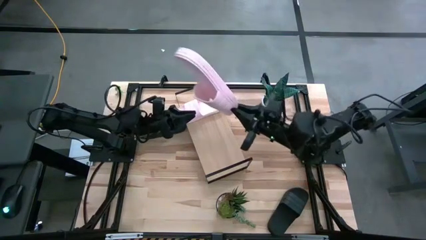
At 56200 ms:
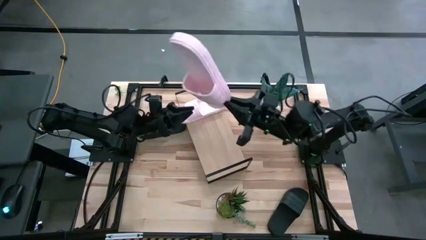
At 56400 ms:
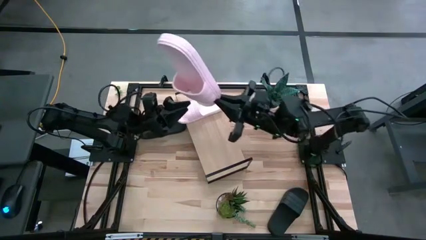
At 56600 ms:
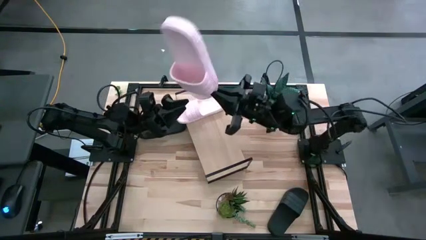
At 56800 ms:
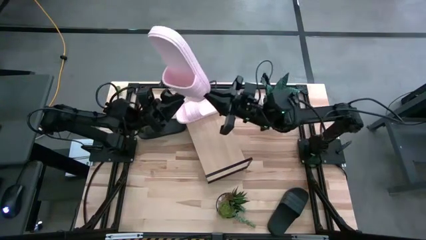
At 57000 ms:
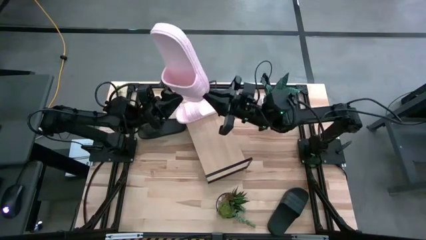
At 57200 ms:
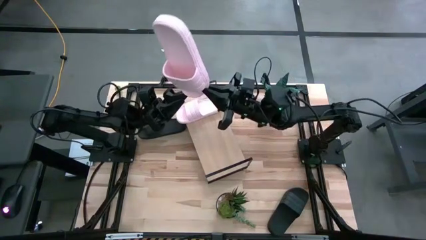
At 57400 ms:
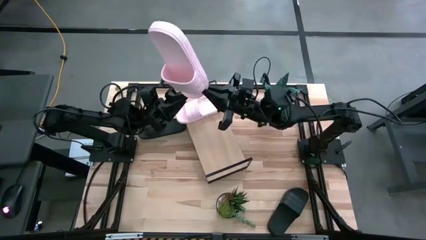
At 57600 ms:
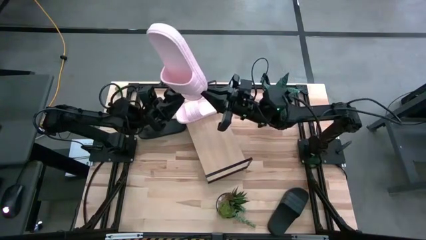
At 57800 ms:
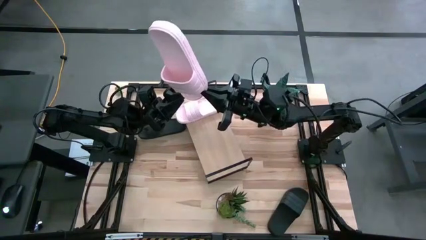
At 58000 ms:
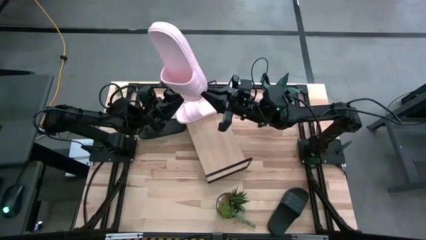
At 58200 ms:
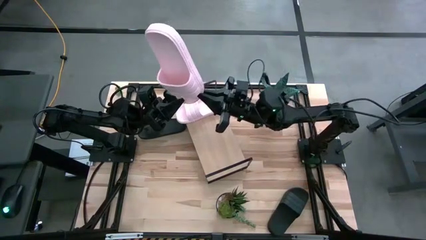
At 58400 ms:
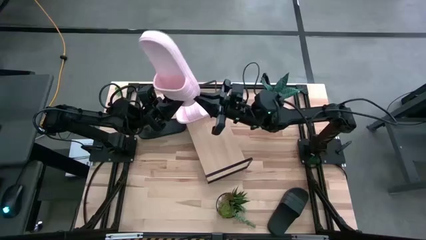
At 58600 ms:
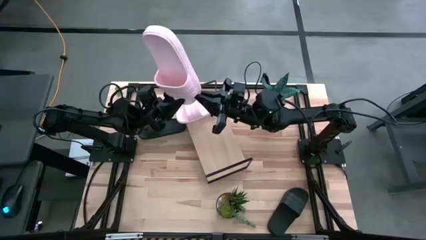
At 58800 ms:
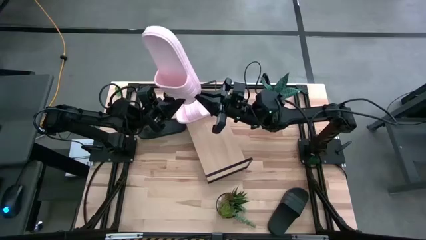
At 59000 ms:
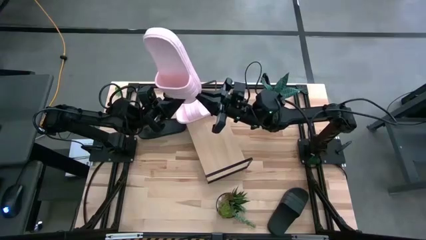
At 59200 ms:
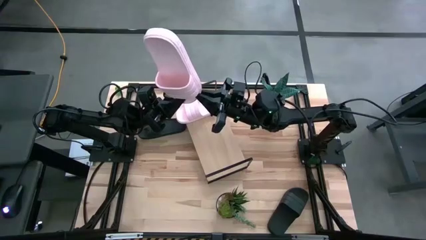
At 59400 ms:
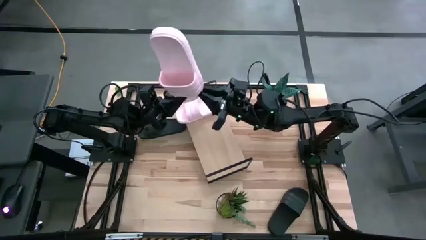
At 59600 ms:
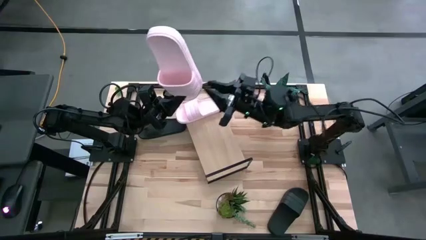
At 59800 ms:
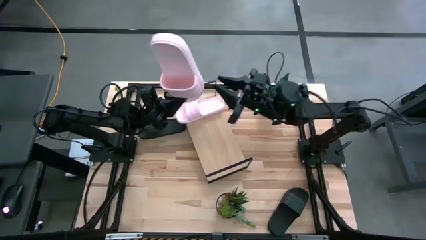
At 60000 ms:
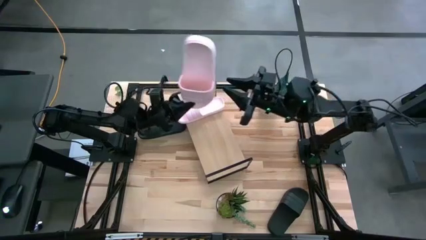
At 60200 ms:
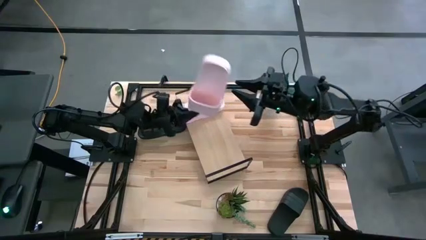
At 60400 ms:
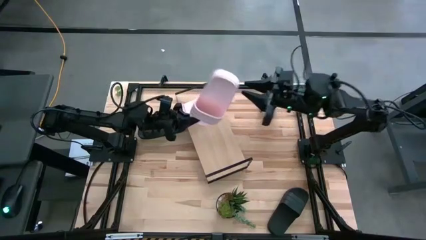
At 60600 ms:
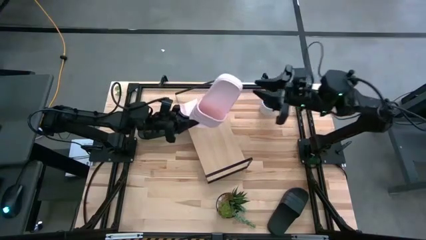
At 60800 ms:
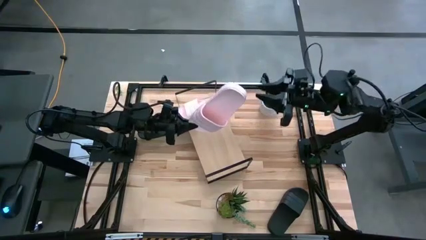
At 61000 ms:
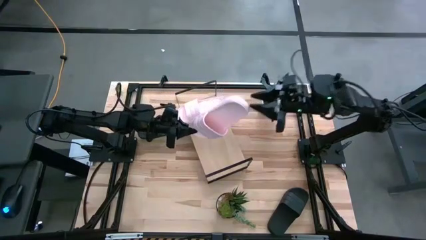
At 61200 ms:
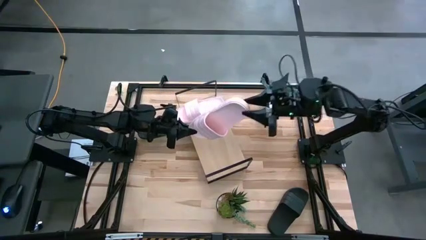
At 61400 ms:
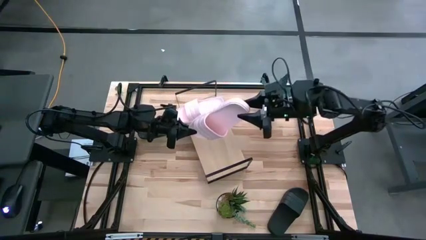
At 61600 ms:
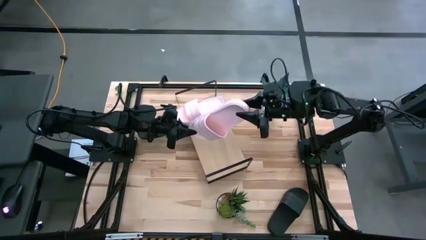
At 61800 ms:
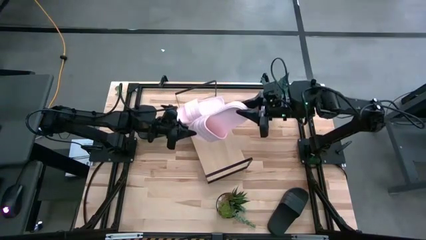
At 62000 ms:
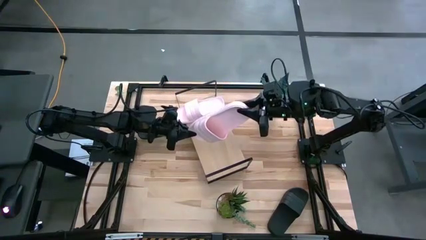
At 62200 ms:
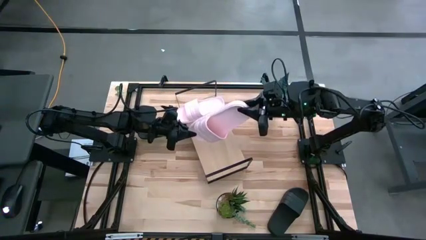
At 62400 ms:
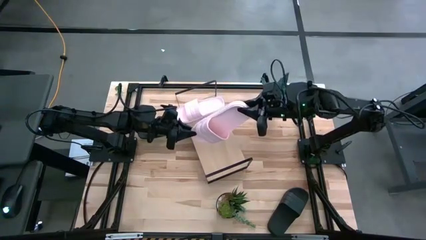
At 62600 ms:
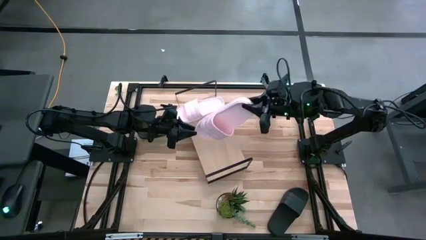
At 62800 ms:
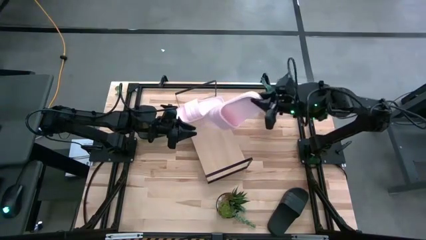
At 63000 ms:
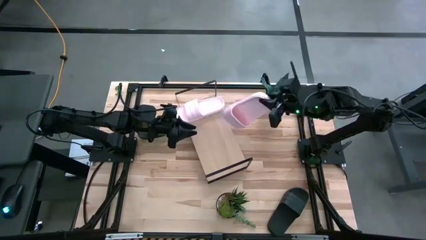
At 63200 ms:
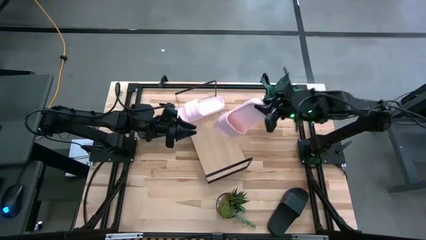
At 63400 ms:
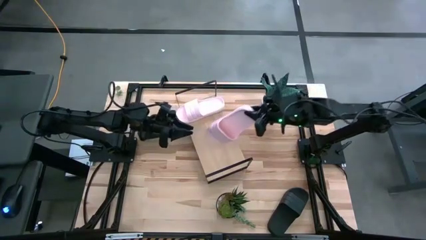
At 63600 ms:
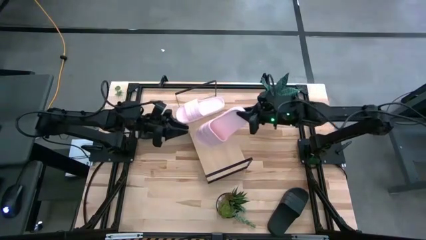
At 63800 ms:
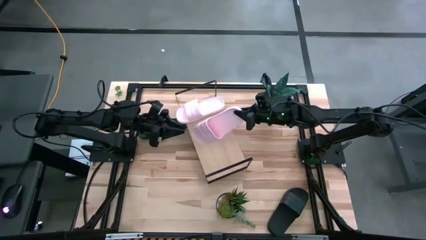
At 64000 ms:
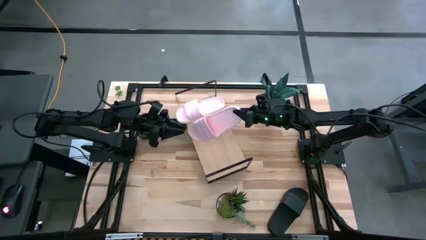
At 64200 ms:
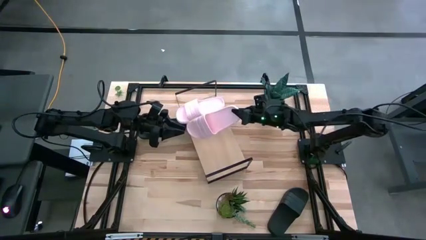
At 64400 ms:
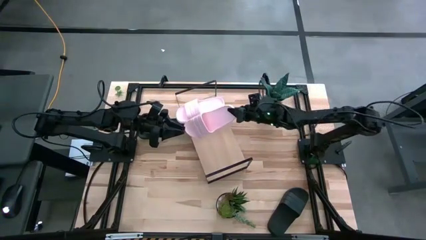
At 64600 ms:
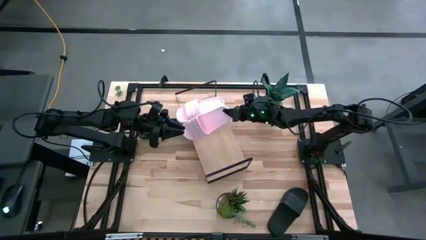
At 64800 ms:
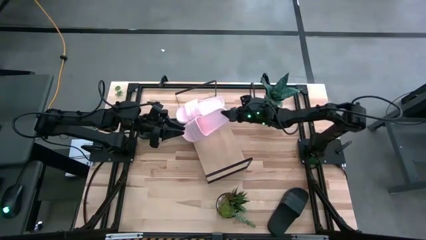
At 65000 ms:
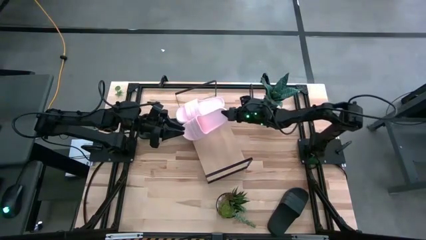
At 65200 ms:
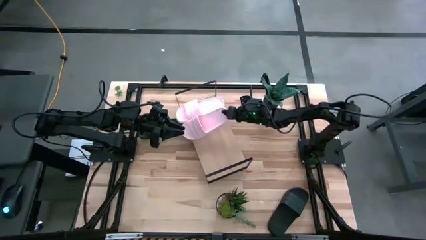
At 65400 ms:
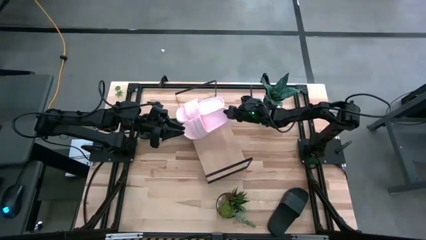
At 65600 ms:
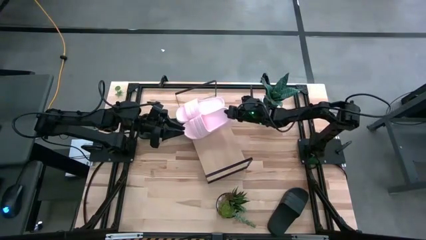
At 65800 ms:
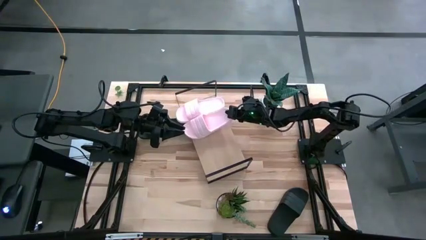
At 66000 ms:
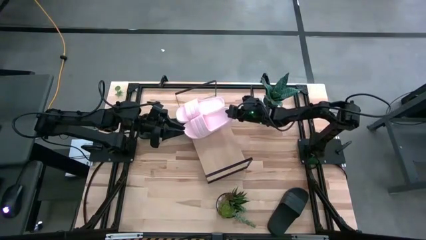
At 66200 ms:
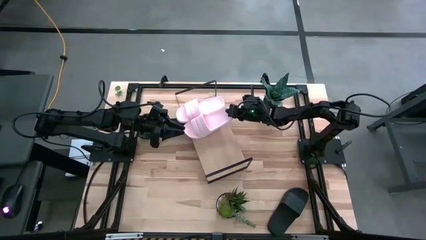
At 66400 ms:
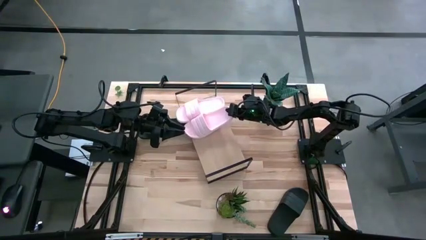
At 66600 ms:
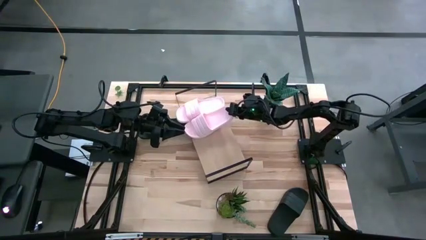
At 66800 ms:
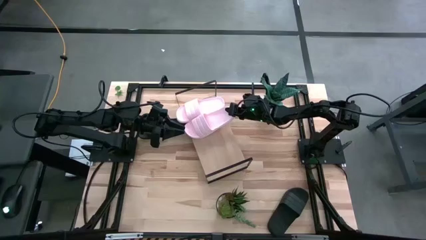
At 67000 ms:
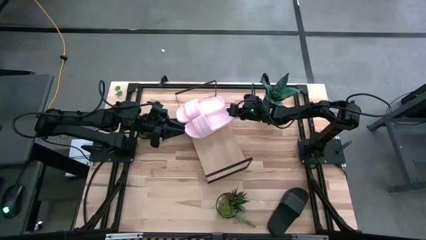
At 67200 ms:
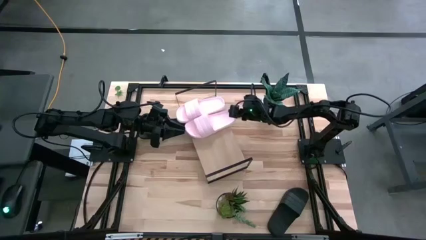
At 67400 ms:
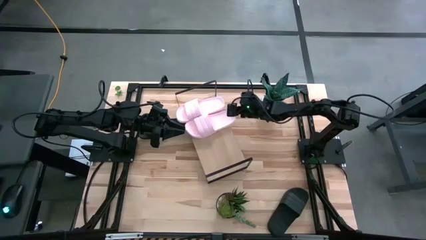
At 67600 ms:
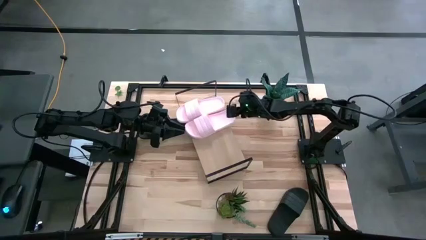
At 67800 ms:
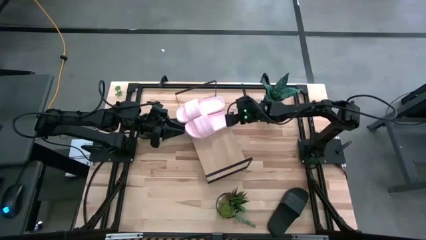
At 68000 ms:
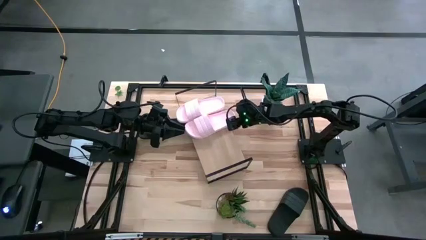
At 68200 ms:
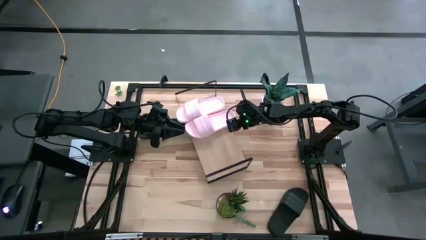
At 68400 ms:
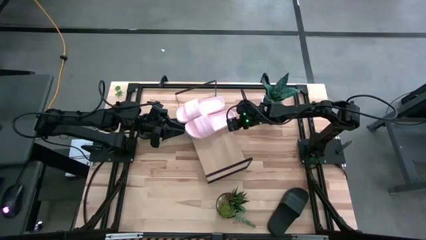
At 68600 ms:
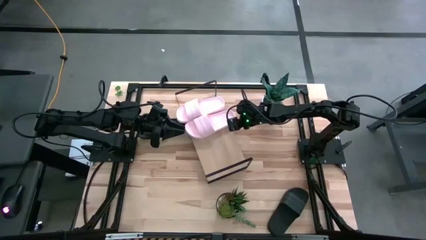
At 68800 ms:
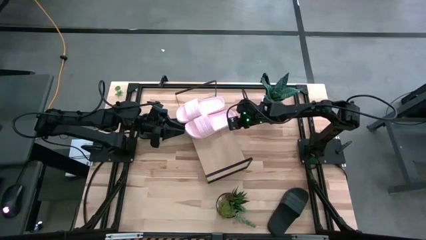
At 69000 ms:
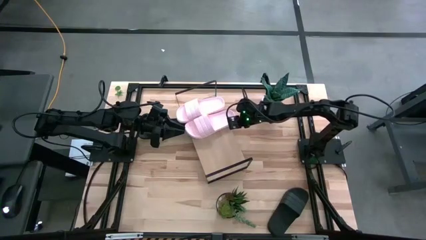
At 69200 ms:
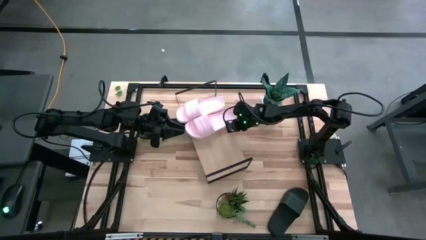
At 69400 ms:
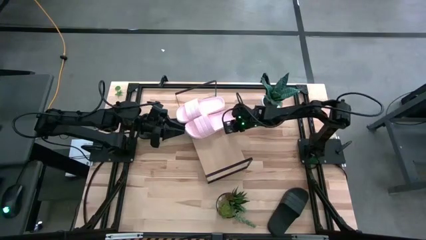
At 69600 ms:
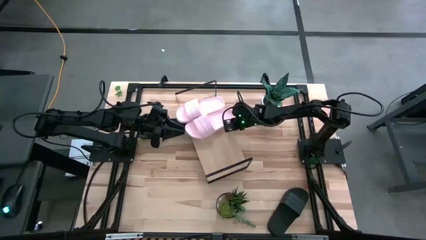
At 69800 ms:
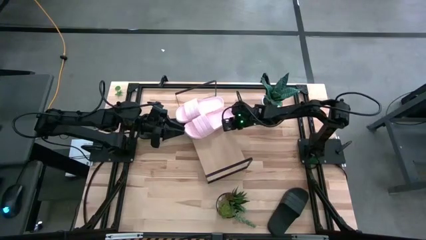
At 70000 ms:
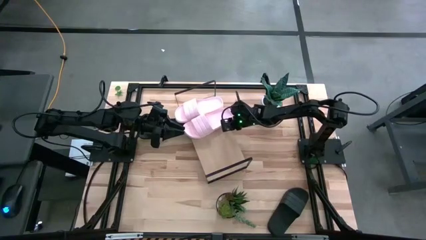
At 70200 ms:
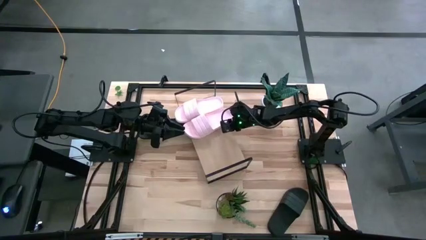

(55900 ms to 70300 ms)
Task: Pick and place slides into the shelf
Put the pink slides on the shelf

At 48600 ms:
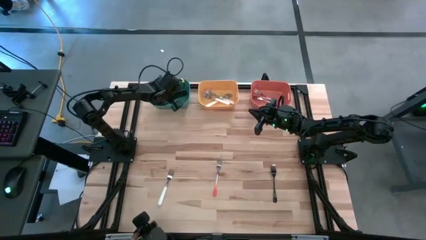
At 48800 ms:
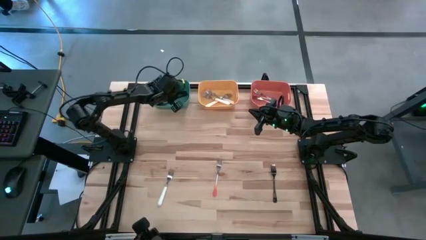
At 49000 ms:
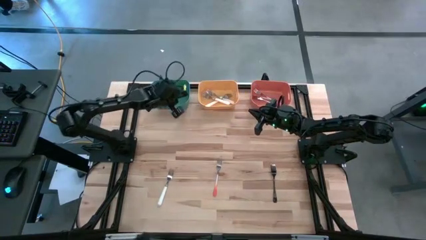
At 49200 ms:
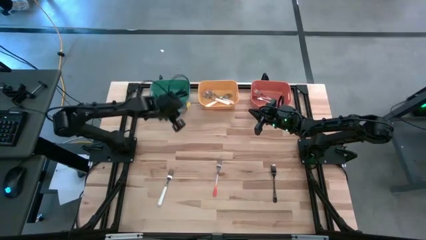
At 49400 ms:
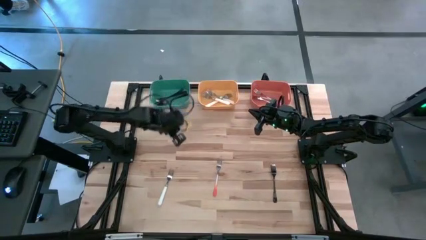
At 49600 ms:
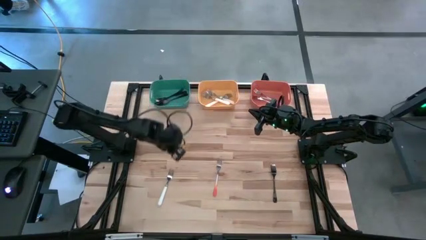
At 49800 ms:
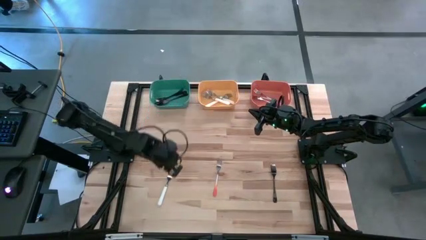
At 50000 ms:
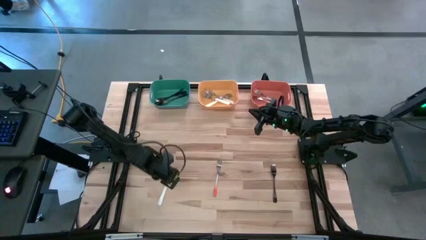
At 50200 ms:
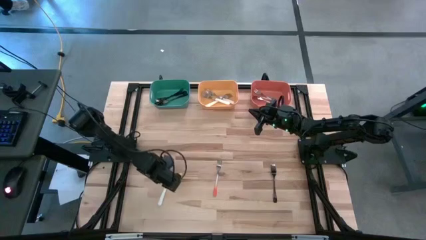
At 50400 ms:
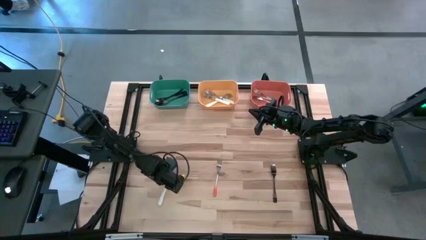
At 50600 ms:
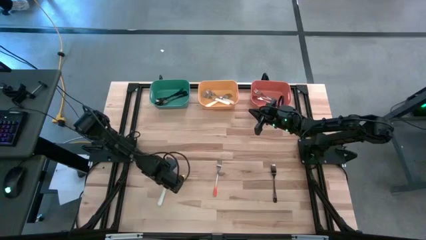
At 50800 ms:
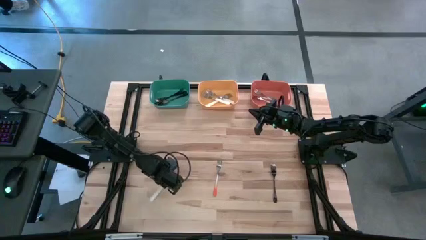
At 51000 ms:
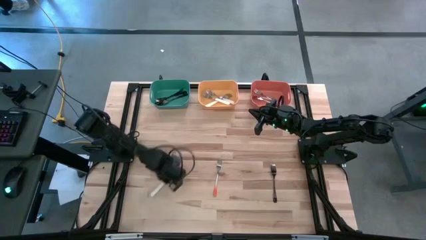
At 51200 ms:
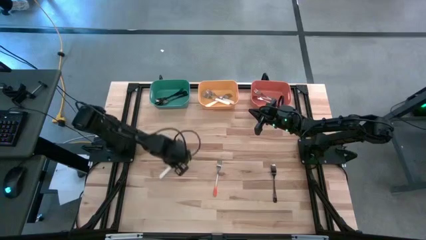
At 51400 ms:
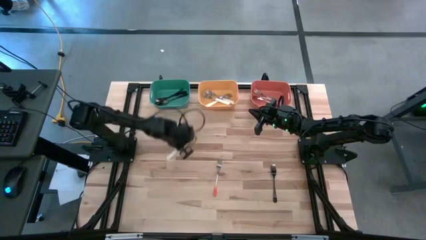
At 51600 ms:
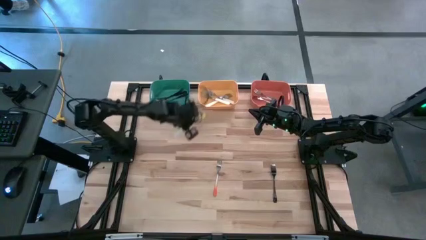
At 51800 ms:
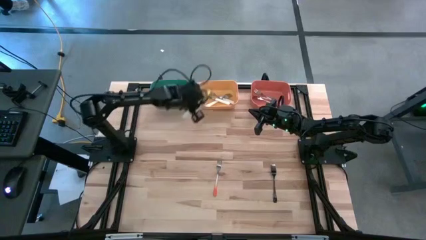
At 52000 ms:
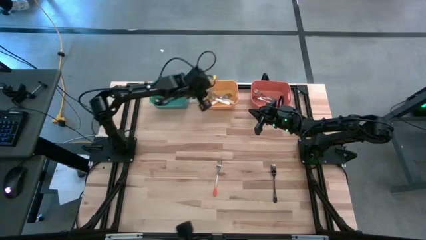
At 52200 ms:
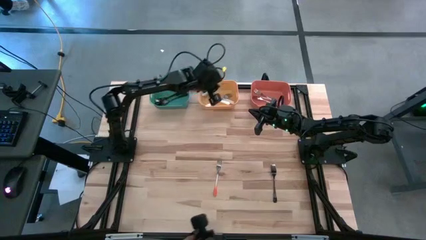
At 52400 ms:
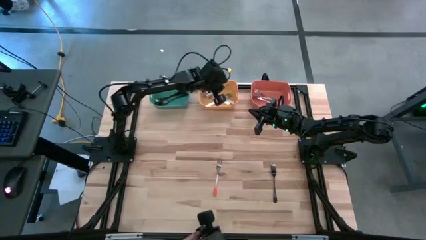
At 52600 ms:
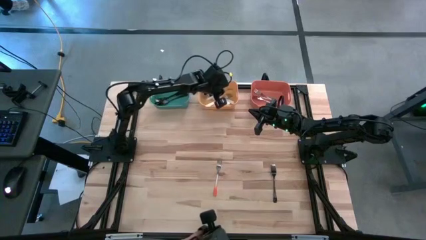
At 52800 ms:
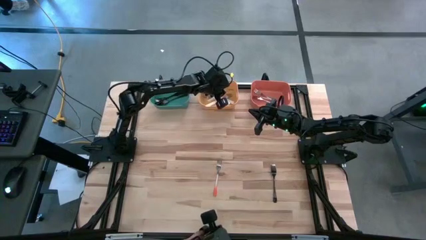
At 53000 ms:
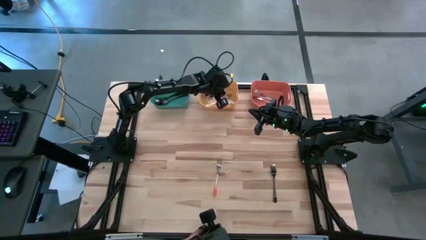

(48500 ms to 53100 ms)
Task: Sort silverware by color (type)
Put the white fork into the yellow bin
